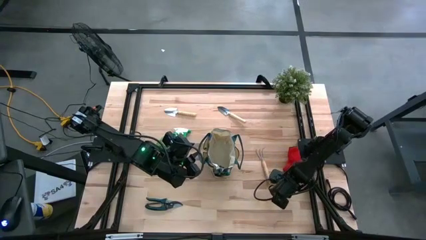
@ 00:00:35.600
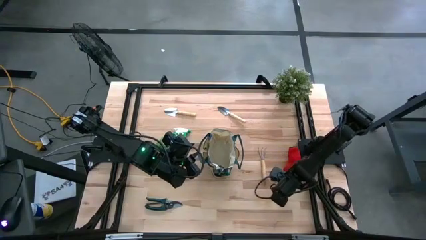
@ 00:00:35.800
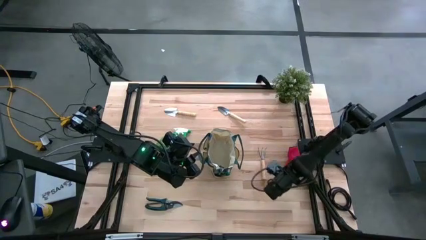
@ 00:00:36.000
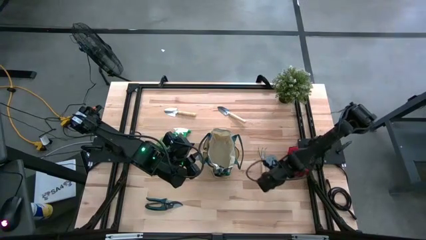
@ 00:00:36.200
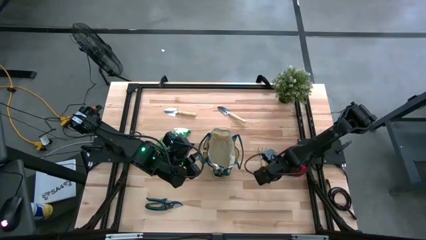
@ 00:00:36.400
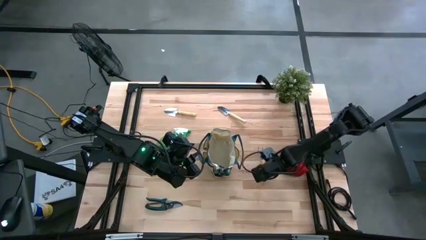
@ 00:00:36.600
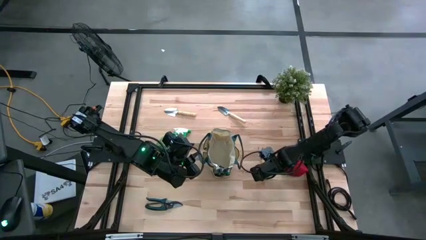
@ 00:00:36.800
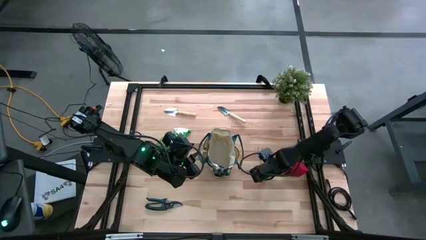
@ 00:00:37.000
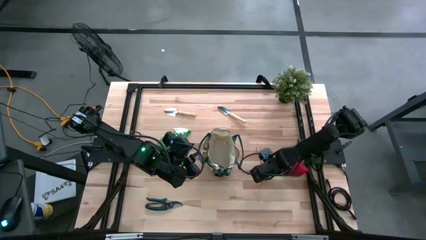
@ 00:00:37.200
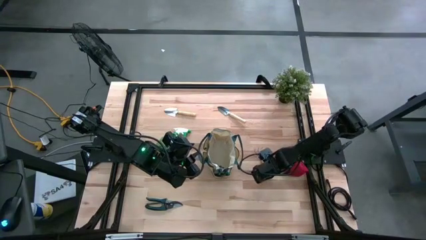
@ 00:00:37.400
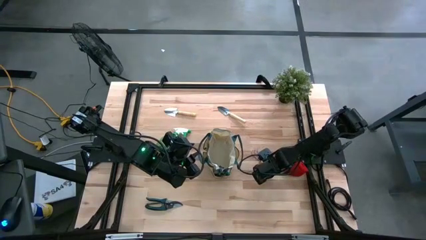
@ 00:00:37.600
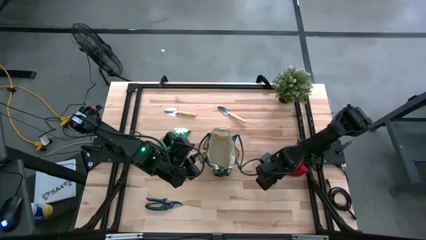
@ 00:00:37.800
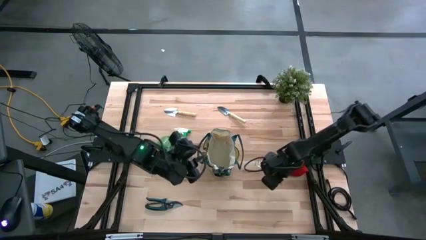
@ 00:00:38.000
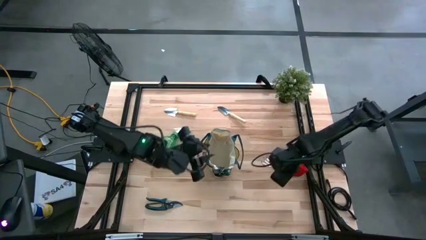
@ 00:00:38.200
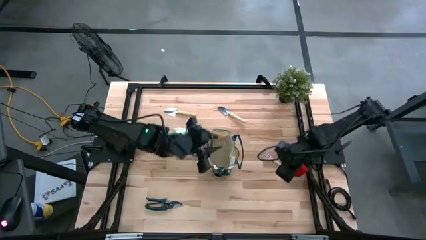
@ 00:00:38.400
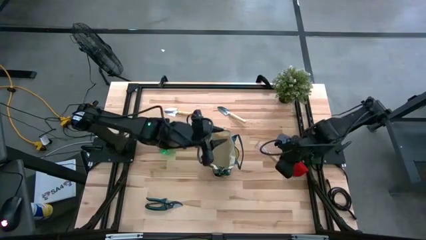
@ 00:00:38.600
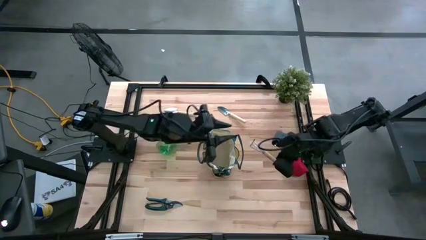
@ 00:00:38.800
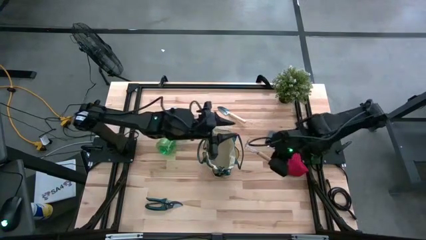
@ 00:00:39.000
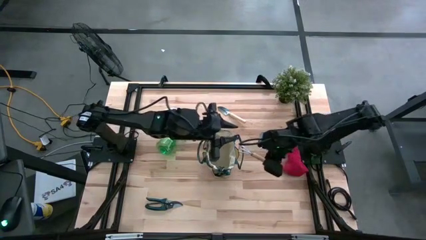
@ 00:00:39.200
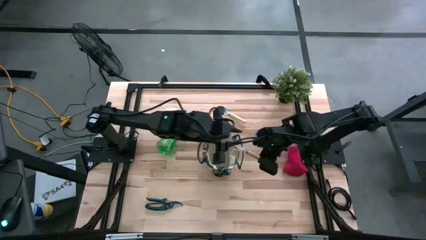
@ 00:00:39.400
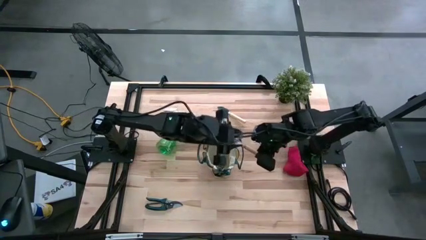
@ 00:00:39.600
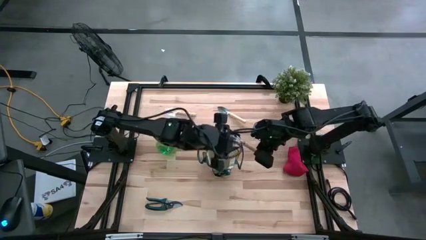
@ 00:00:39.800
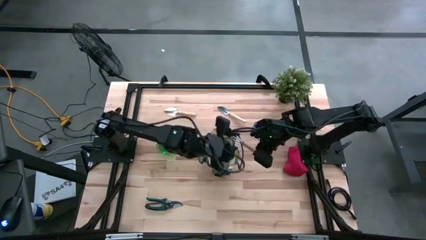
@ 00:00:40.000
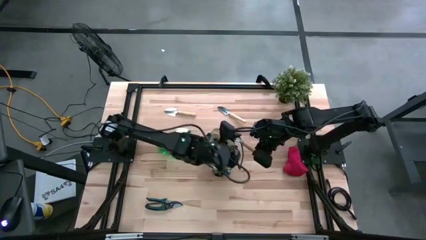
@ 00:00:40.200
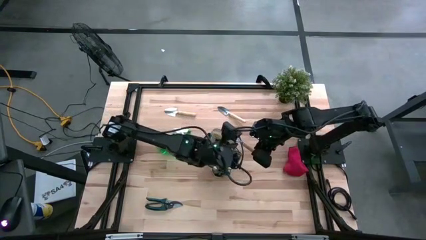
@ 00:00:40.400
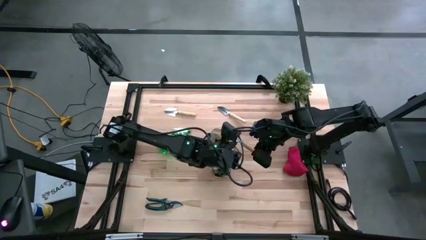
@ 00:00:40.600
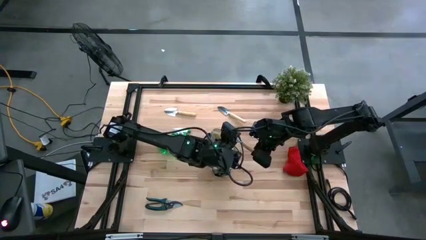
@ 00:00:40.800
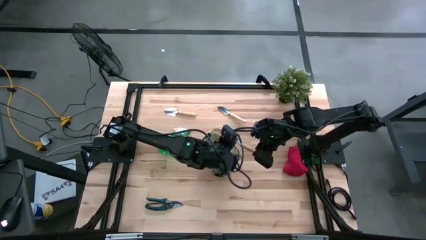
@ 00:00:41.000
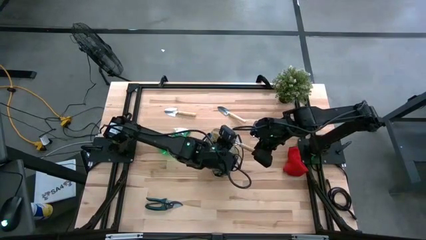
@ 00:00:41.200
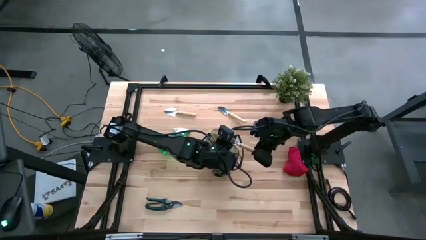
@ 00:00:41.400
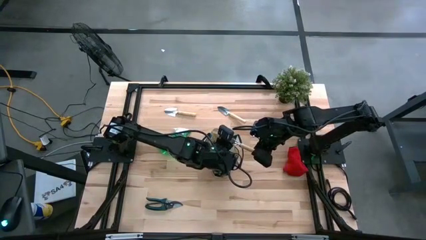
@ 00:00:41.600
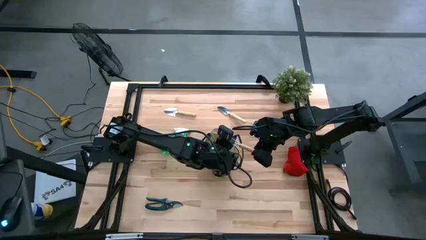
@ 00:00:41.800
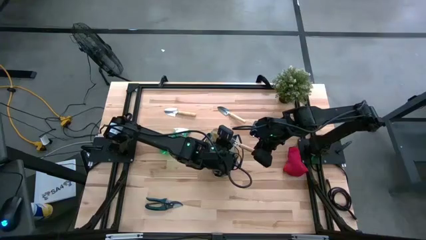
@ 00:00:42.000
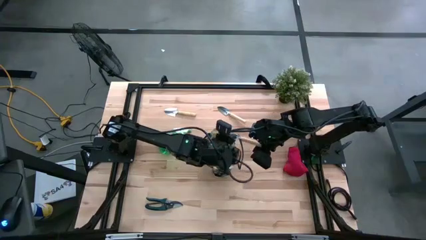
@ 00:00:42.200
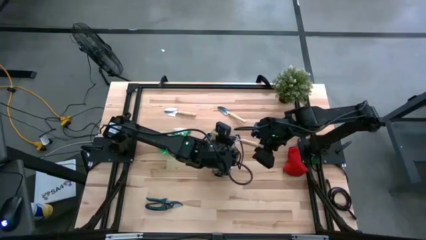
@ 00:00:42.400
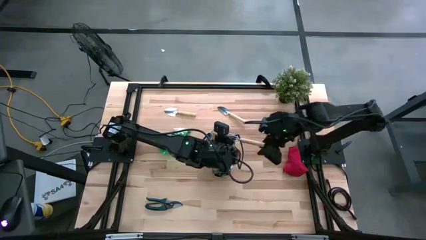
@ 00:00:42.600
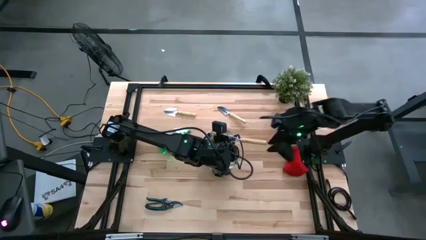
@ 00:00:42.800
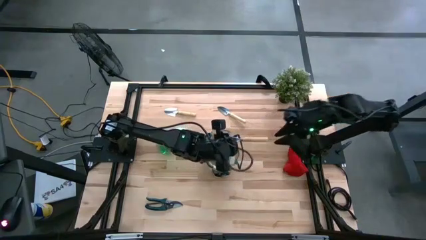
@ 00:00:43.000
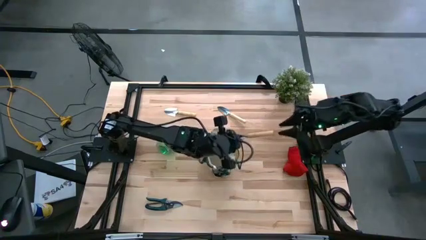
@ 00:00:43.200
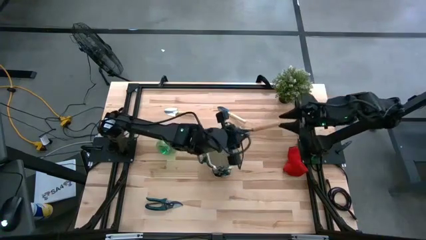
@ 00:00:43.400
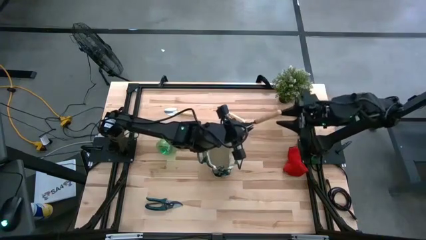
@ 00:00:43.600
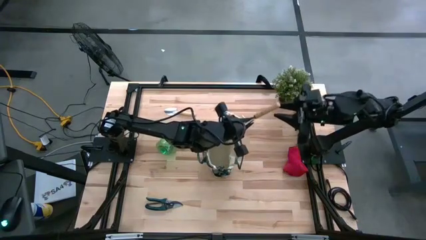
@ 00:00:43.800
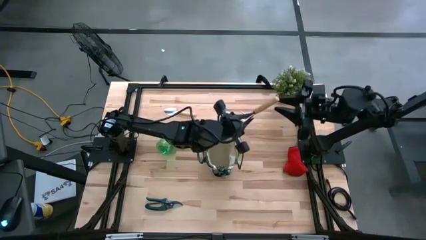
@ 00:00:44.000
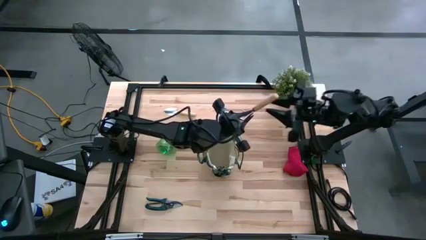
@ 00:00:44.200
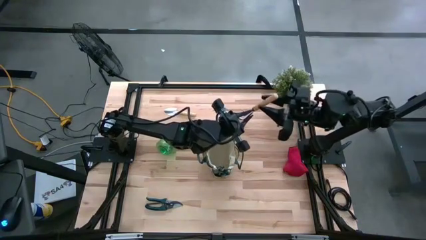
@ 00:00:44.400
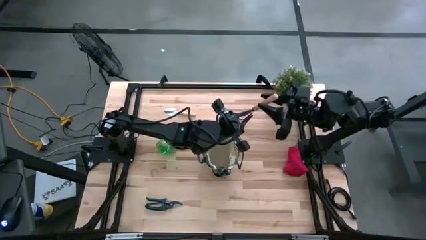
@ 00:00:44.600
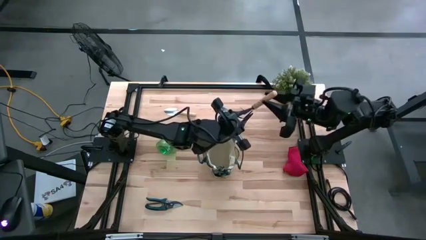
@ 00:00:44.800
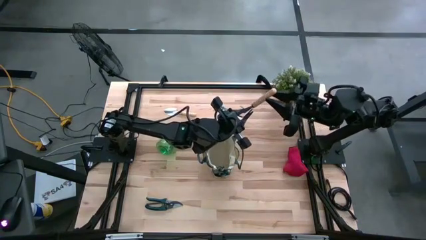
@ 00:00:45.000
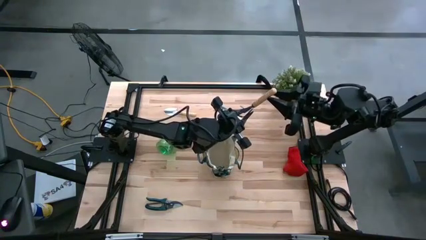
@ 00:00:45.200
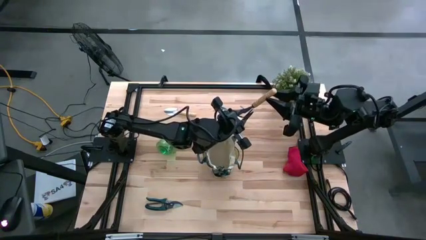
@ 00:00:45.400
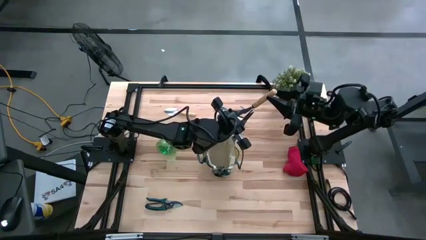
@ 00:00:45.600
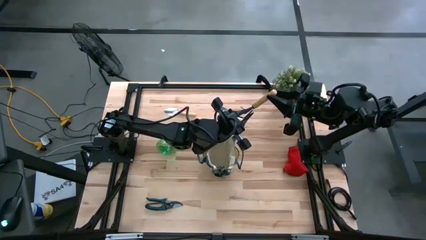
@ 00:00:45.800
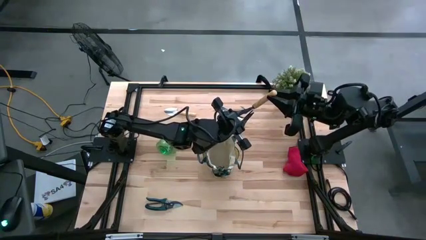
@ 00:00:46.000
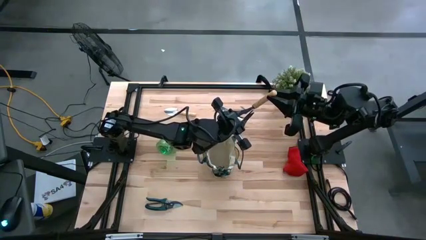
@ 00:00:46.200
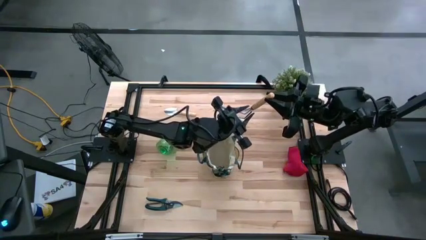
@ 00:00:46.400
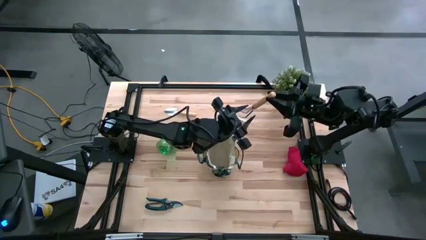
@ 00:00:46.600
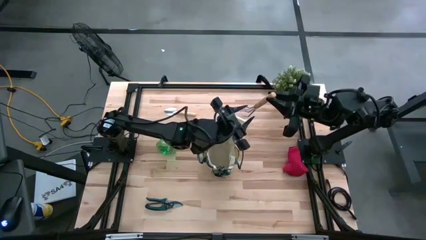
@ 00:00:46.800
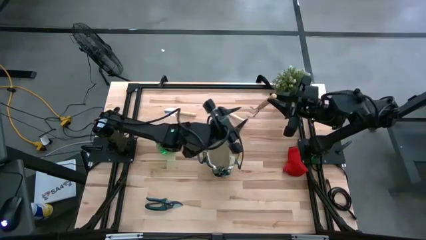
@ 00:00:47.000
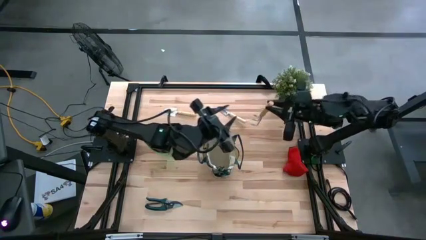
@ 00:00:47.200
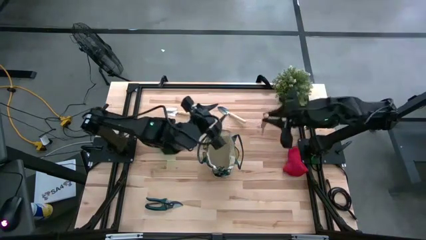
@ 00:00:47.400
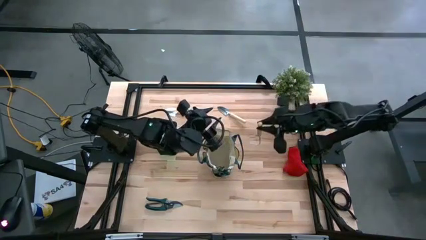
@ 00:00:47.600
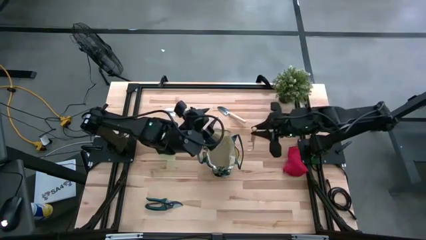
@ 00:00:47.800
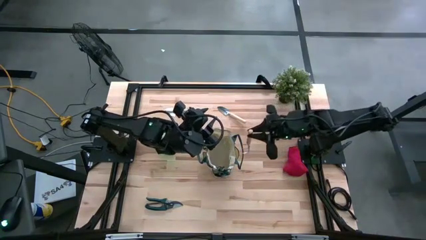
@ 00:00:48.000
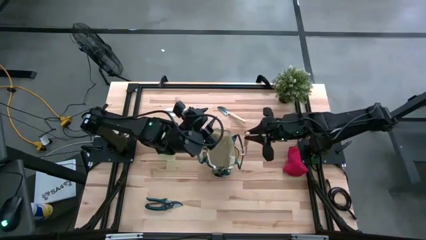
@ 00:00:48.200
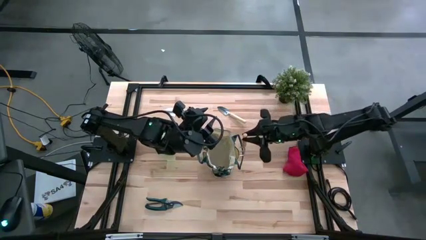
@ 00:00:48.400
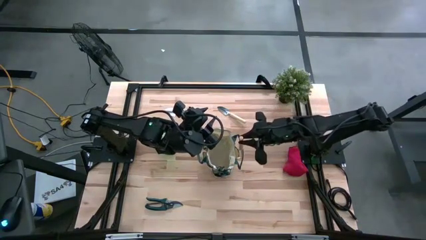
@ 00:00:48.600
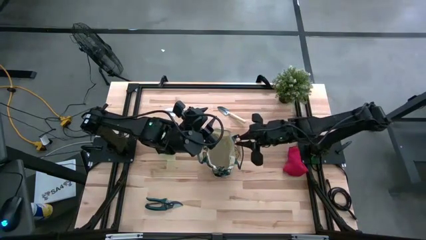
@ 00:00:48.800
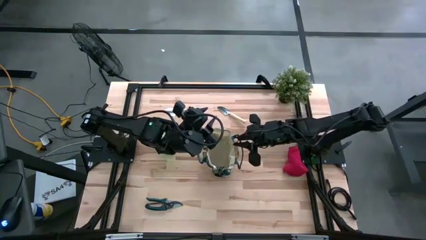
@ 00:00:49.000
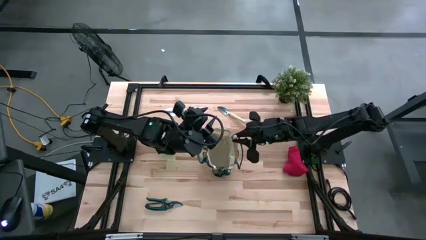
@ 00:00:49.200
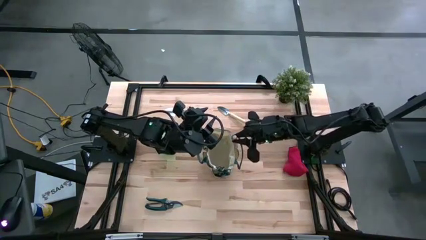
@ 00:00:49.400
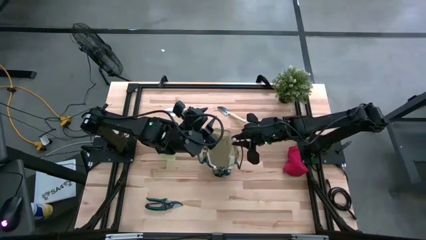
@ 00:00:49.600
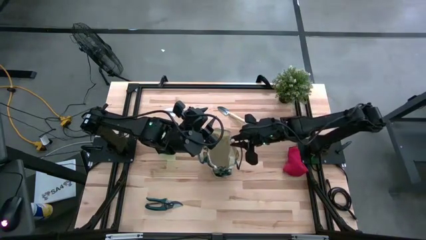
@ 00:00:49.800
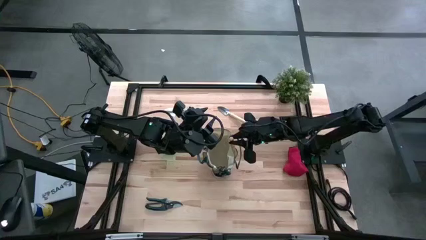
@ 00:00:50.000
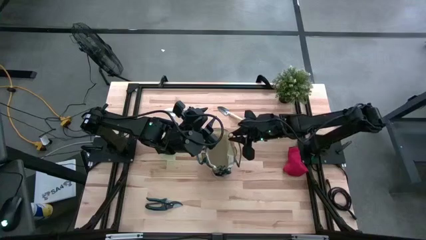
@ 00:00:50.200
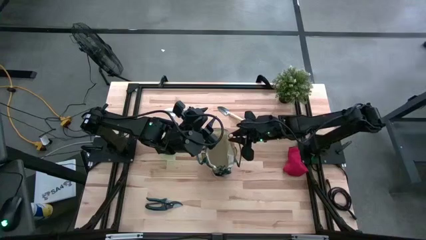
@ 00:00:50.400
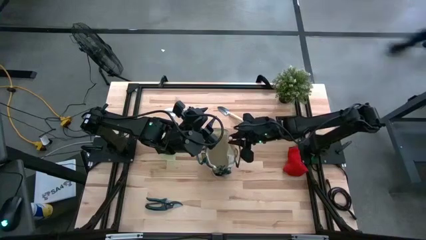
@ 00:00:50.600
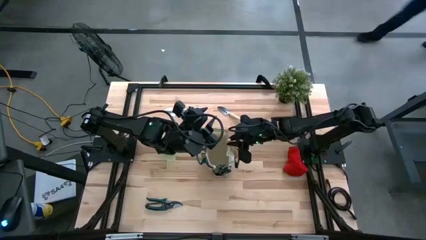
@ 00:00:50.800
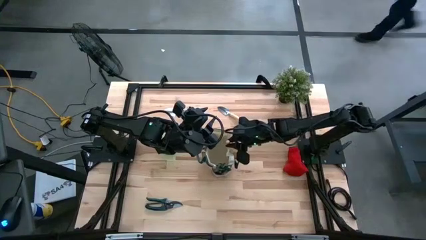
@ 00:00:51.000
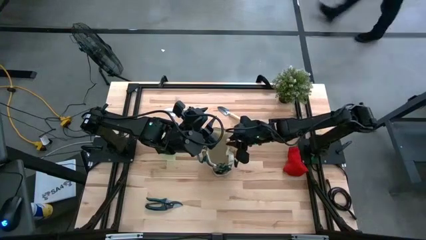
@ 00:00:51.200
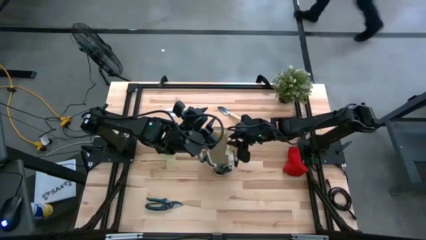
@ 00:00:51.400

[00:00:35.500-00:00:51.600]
Task: Pick & Place Garden tools in Gardening bag
Put the brown hand rake into the white gardening bag
